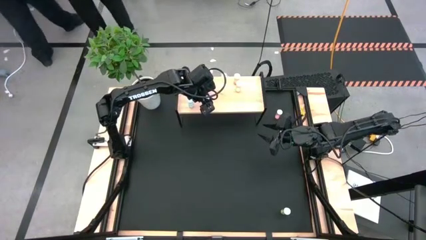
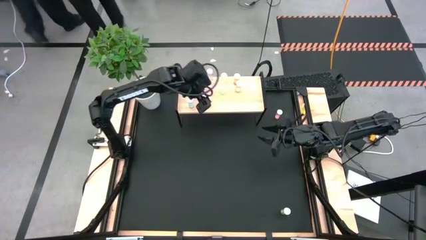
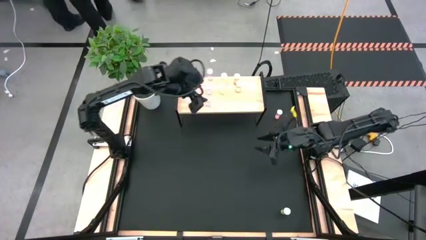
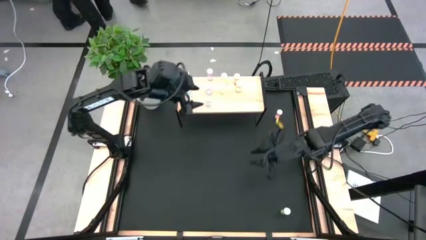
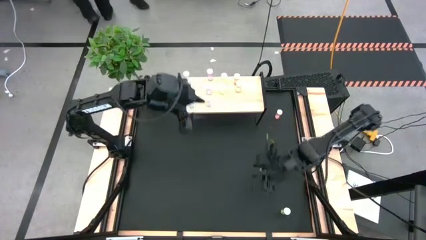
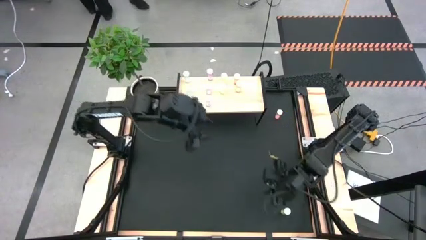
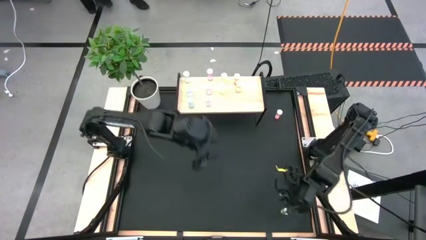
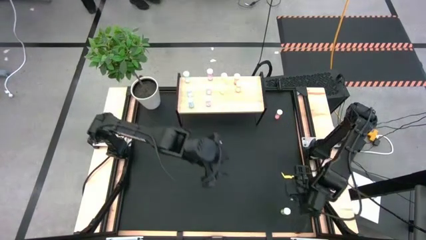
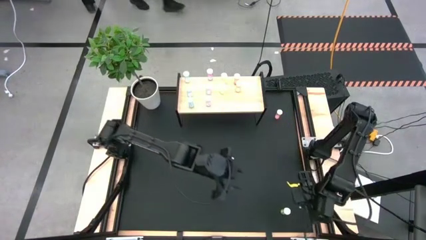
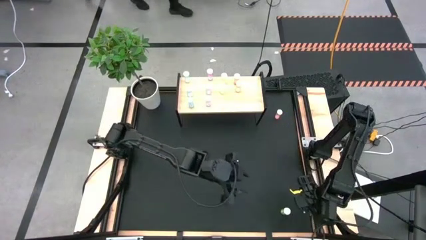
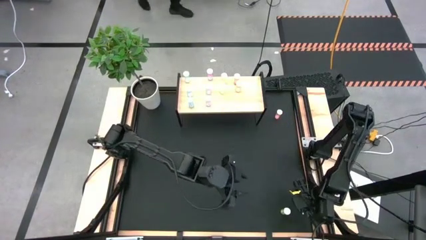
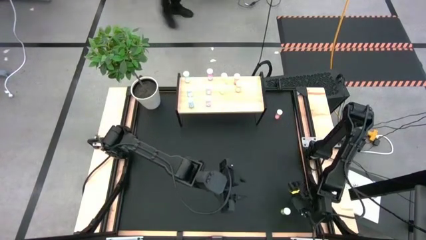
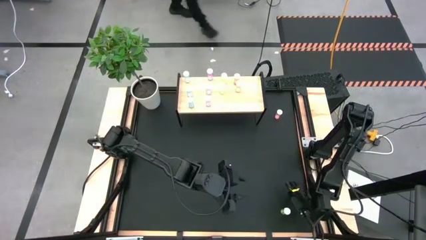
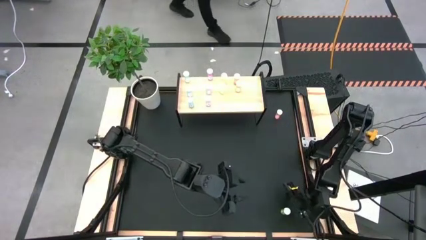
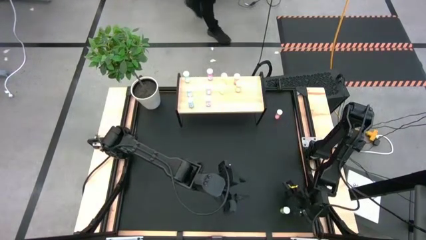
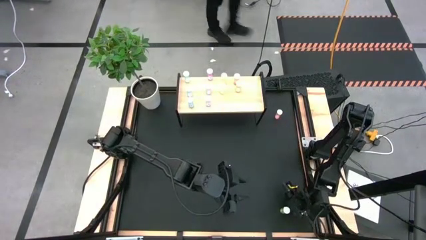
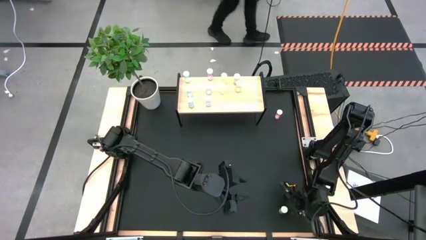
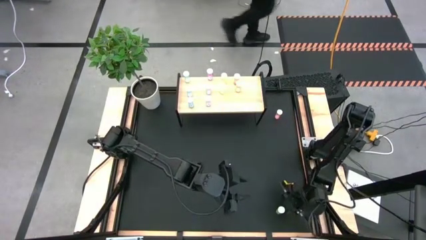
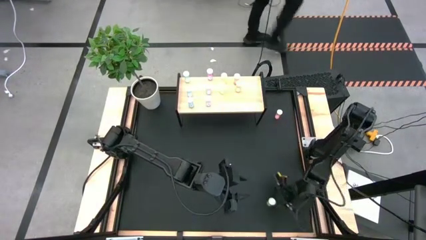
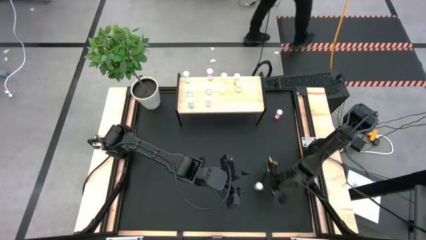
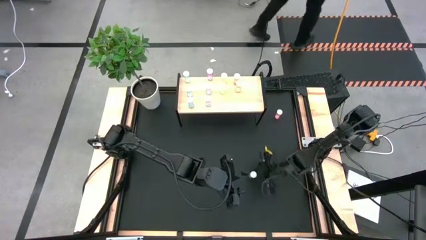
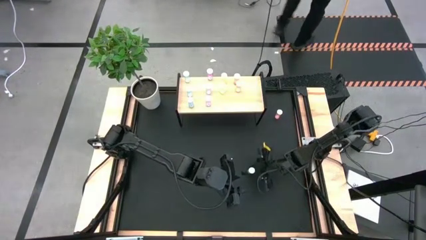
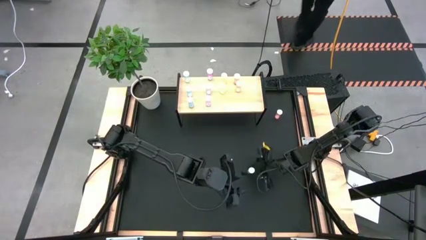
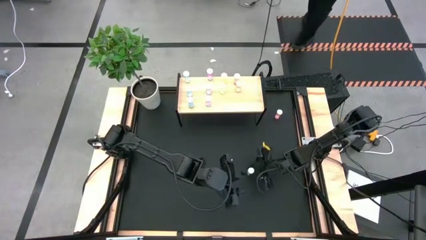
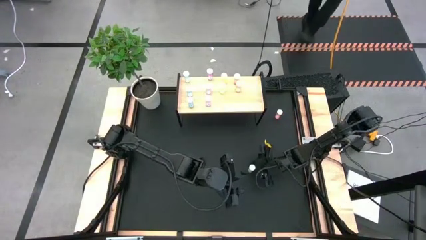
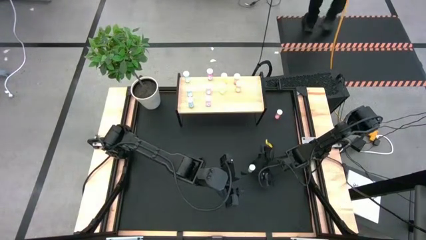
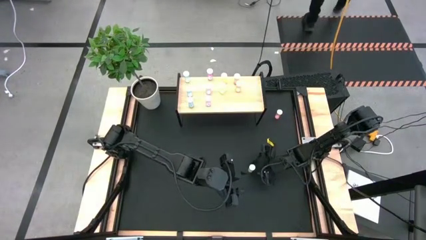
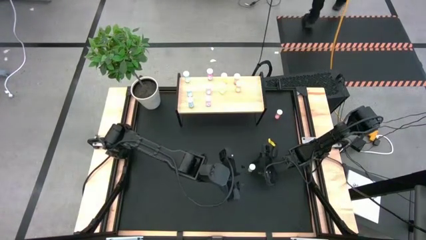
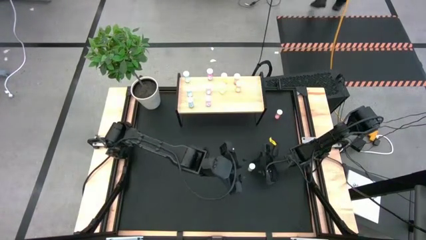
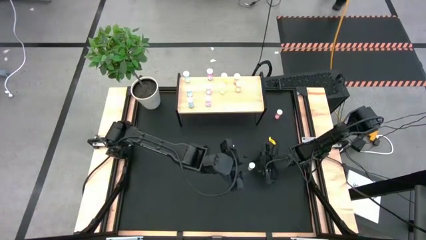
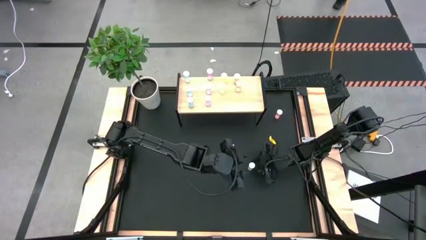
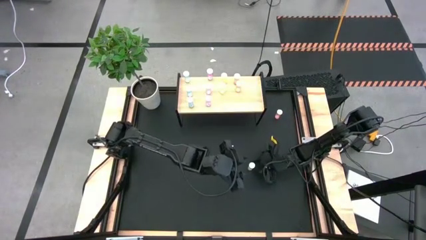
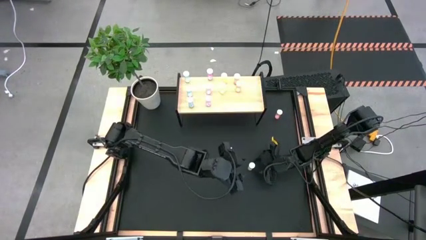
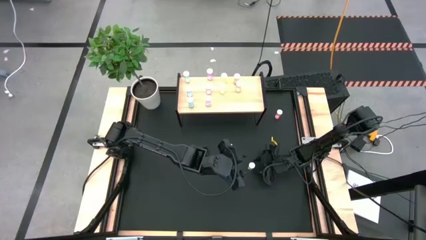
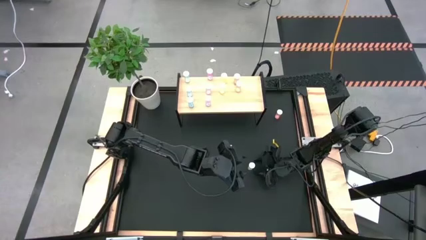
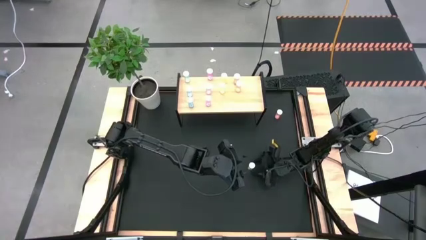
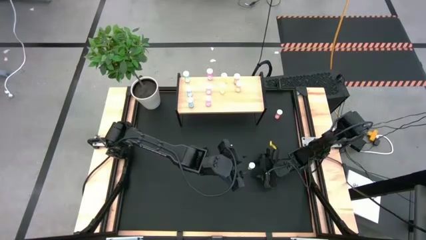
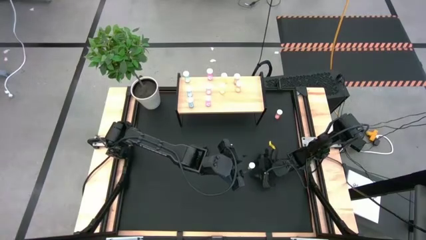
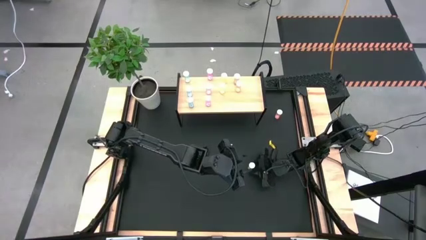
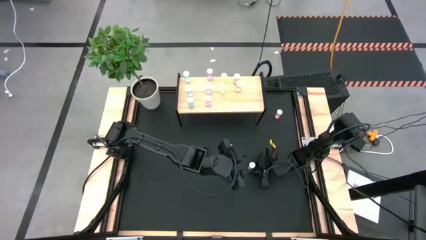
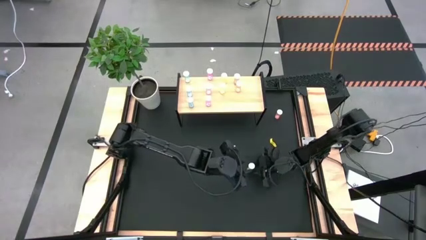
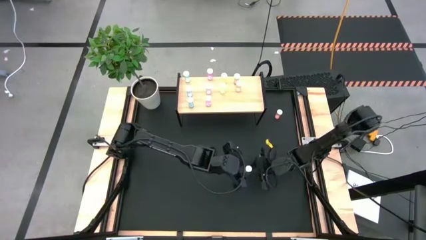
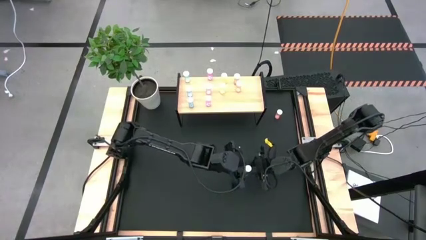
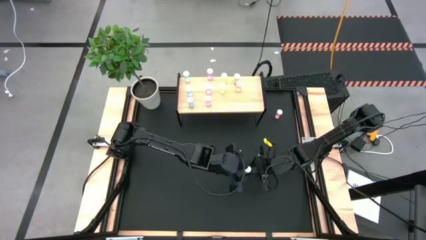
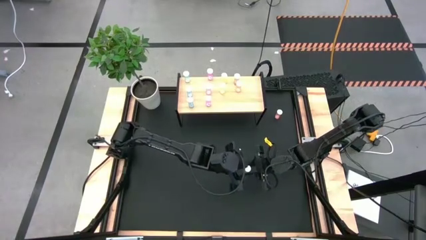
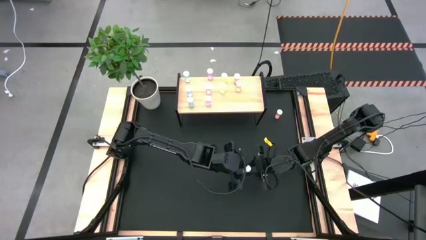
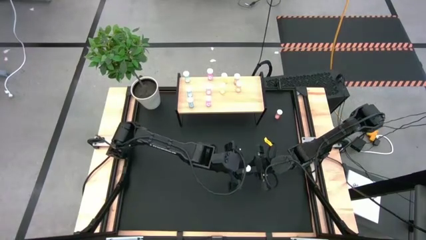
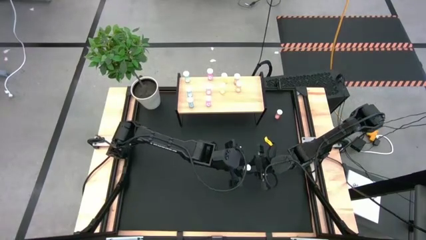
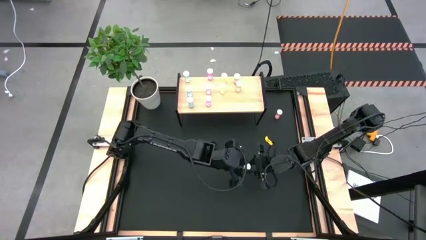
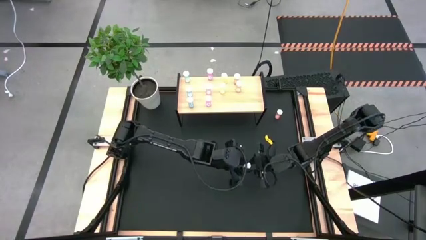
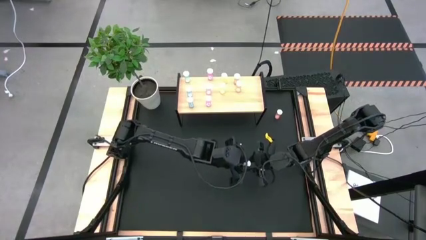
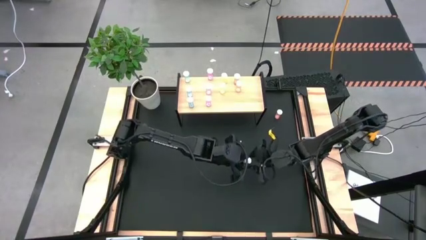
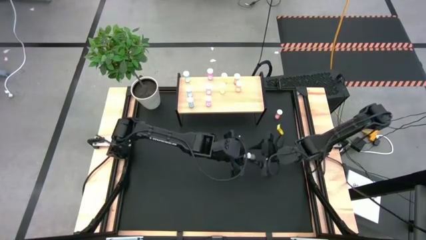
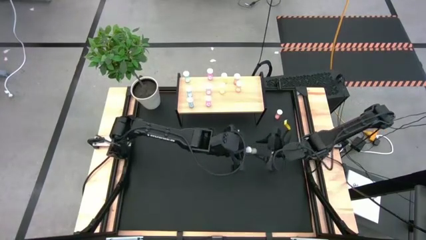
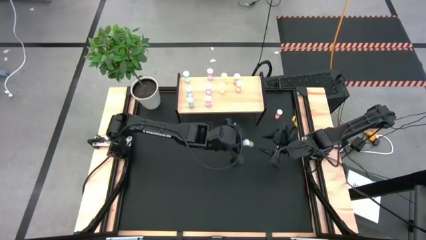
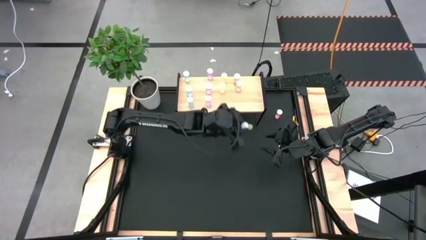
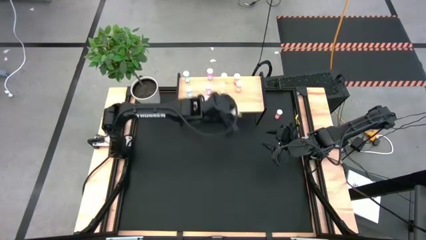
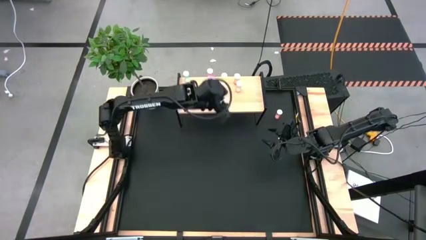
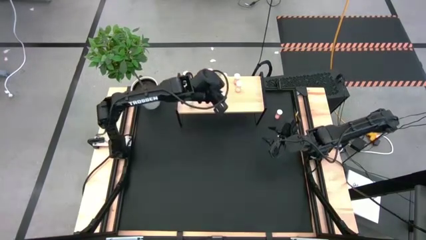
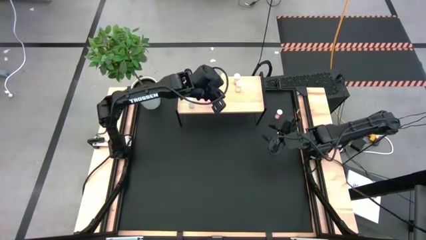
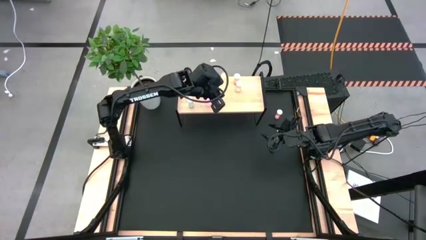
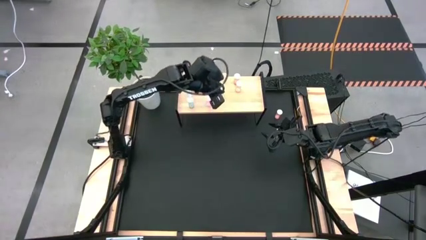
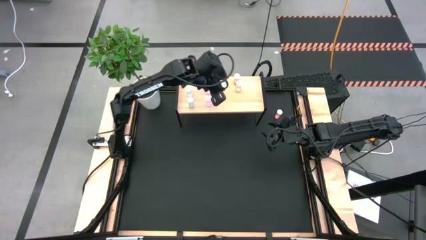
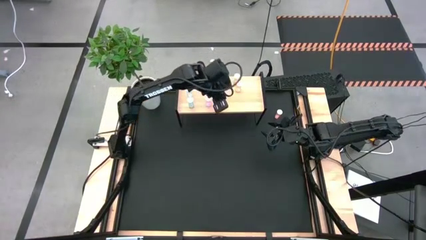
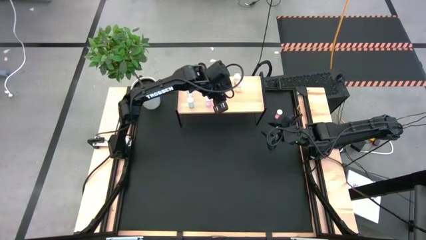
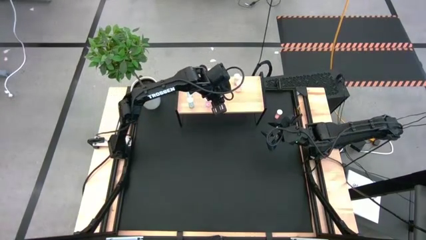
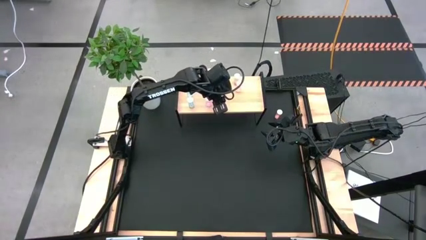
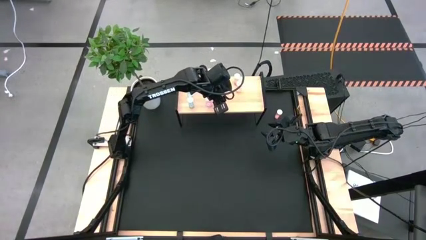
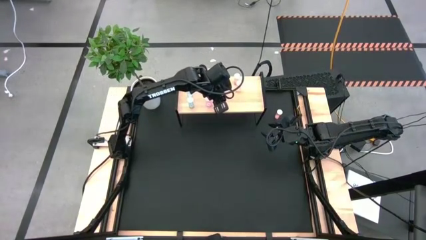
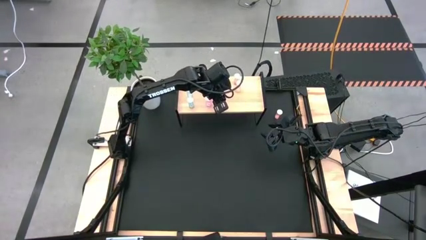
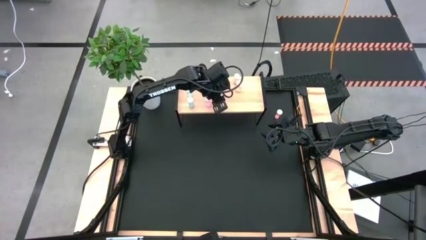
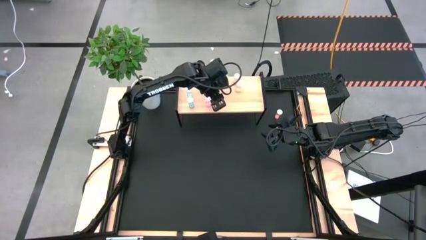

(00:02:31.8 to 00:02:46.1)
Task: Pick and place medicine bottles onto shelf by color
Put the yellow pill bottle on the shelf aligned with the other yellow pill bottles

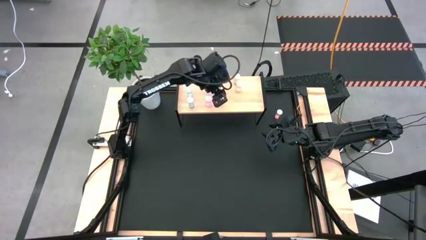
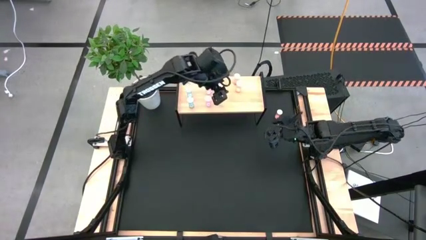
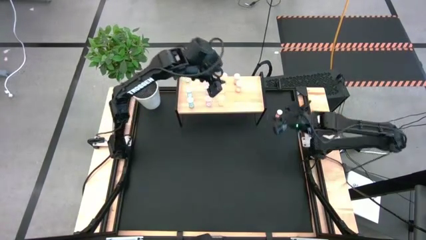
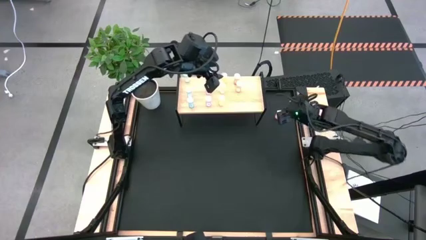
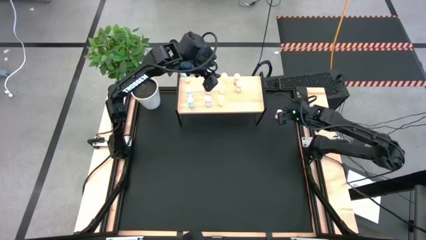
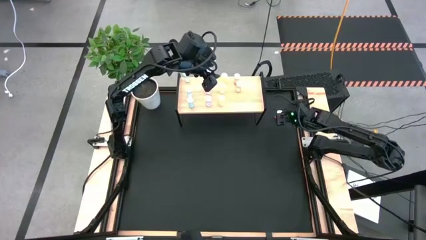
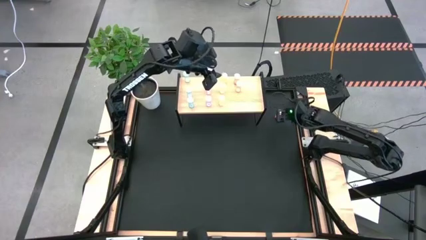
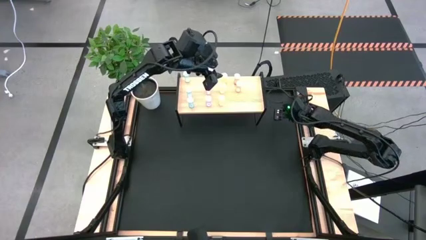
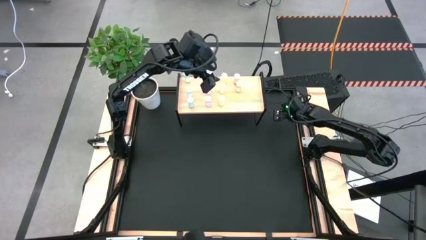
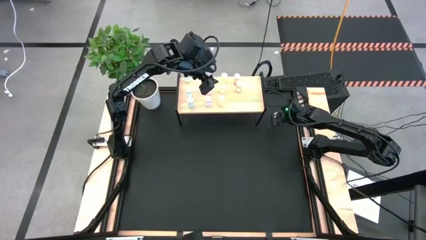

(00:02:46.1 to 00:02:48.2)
Put the orange pill bottle on the shelf aligned with the other orange pill bottles
